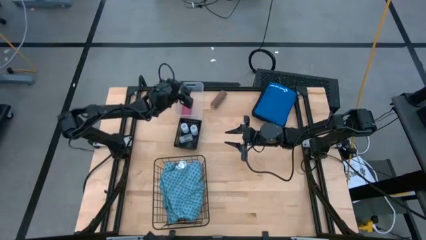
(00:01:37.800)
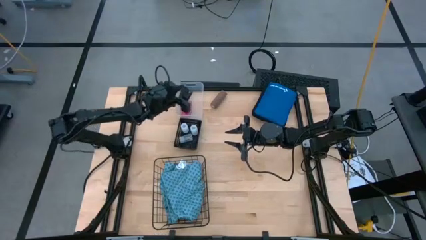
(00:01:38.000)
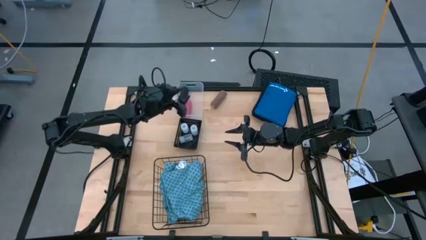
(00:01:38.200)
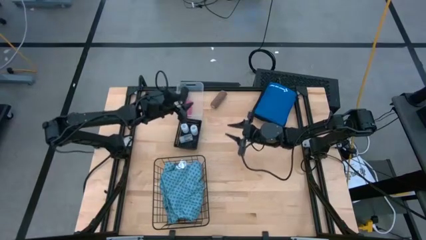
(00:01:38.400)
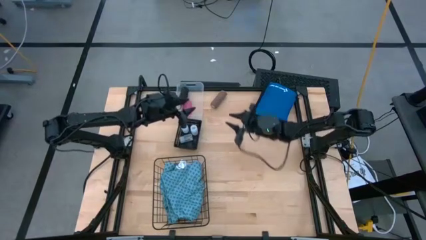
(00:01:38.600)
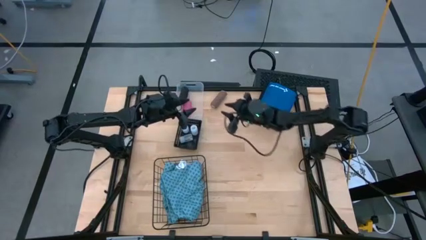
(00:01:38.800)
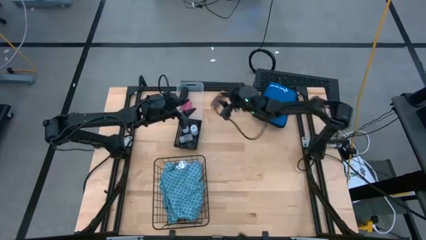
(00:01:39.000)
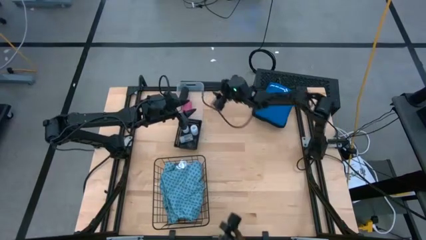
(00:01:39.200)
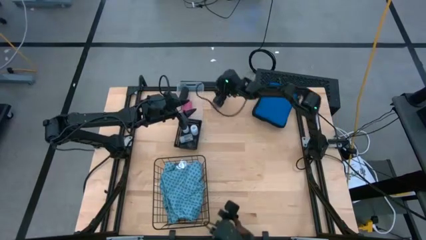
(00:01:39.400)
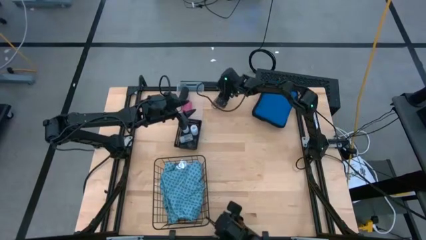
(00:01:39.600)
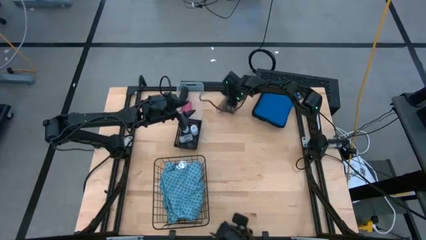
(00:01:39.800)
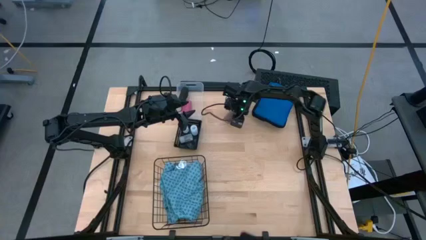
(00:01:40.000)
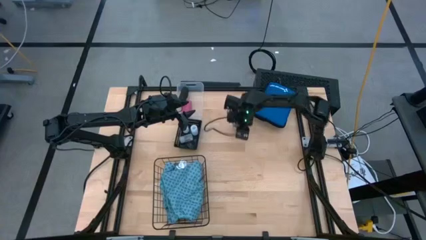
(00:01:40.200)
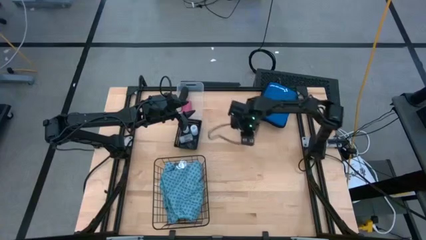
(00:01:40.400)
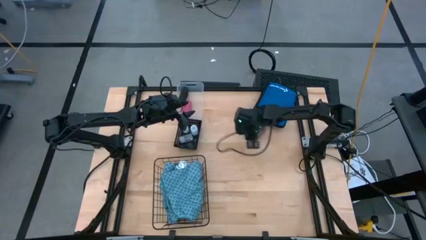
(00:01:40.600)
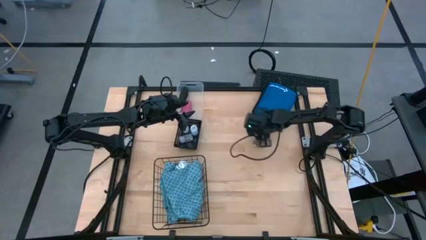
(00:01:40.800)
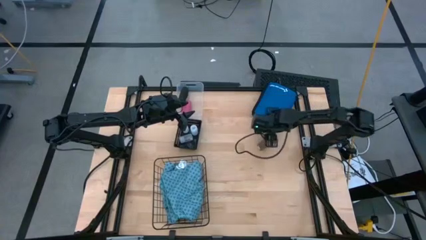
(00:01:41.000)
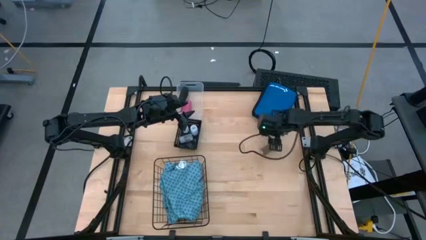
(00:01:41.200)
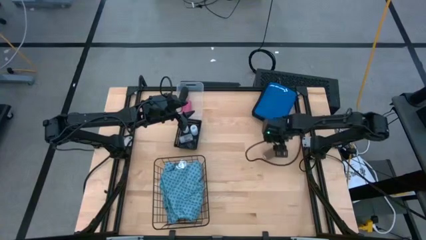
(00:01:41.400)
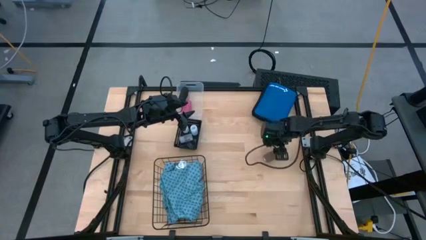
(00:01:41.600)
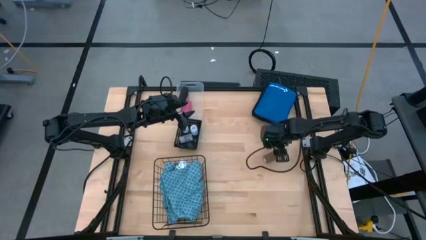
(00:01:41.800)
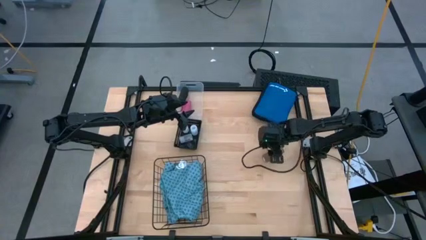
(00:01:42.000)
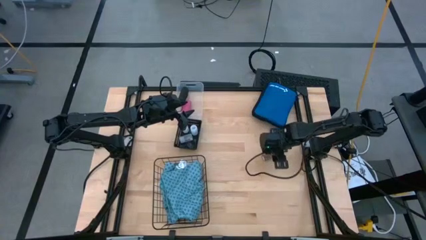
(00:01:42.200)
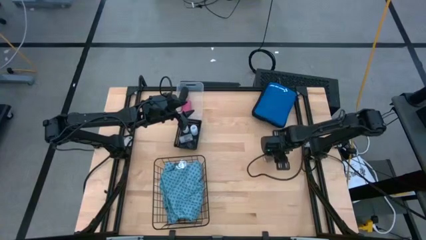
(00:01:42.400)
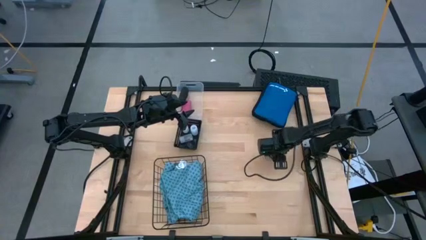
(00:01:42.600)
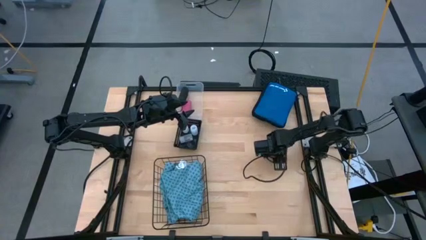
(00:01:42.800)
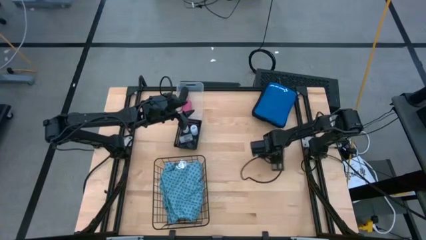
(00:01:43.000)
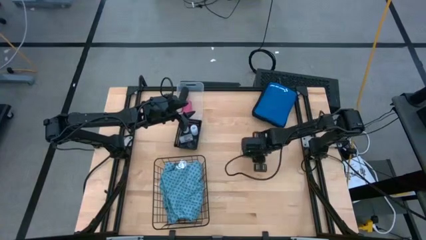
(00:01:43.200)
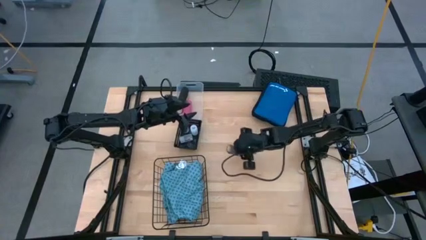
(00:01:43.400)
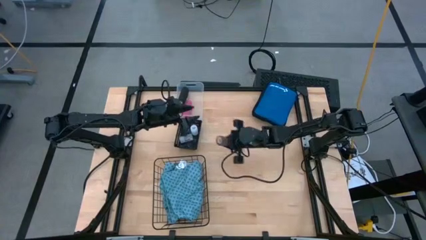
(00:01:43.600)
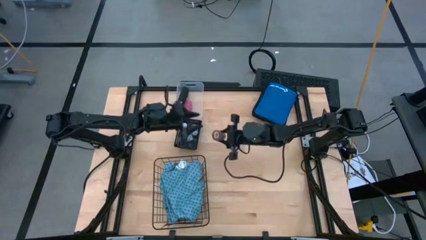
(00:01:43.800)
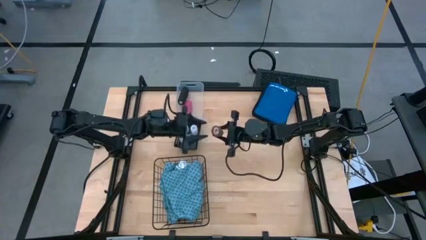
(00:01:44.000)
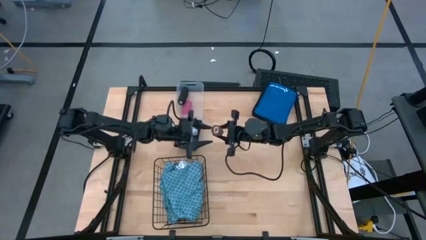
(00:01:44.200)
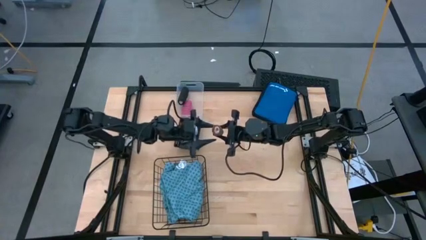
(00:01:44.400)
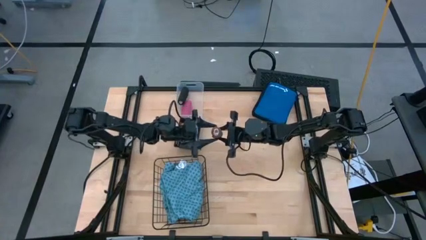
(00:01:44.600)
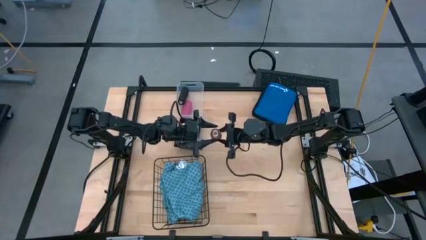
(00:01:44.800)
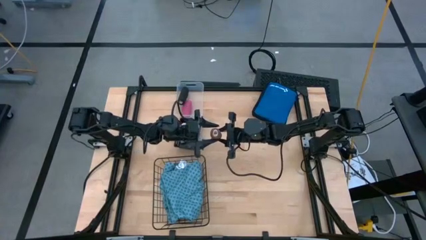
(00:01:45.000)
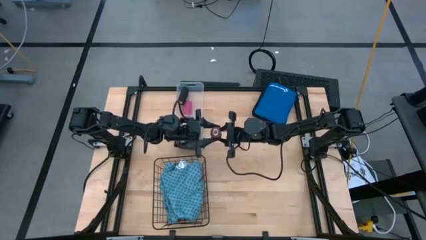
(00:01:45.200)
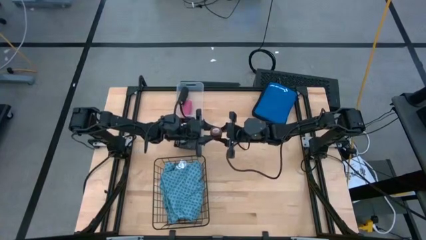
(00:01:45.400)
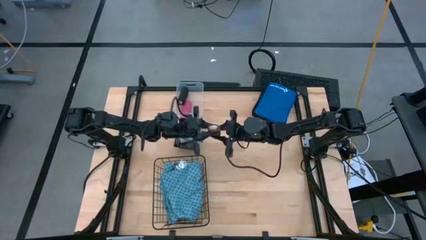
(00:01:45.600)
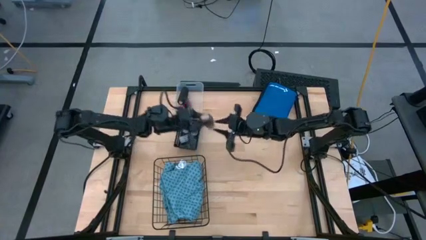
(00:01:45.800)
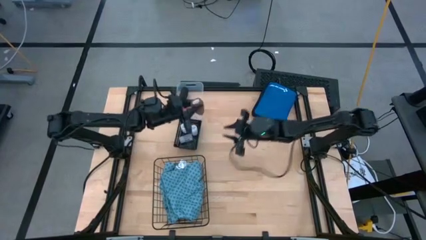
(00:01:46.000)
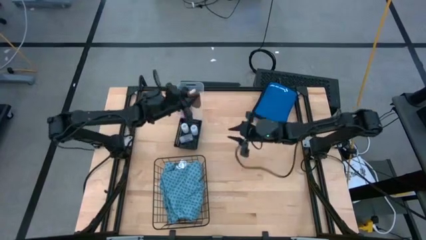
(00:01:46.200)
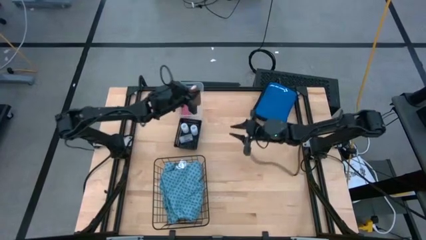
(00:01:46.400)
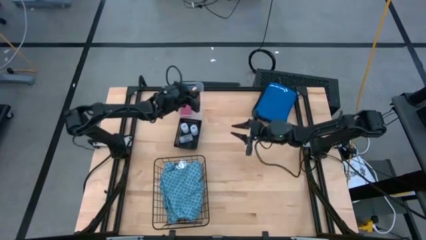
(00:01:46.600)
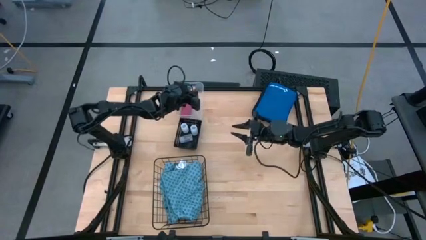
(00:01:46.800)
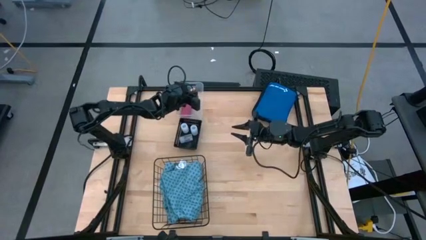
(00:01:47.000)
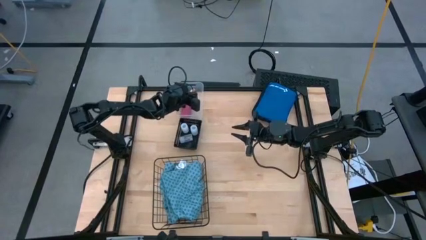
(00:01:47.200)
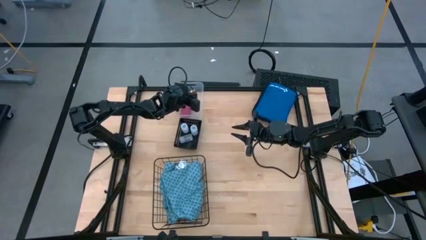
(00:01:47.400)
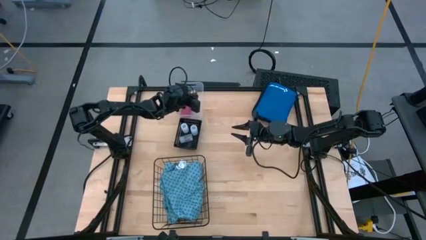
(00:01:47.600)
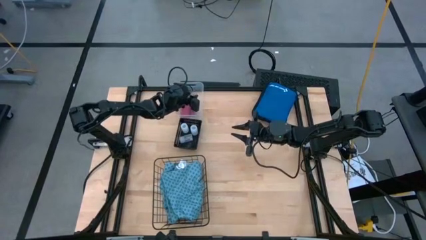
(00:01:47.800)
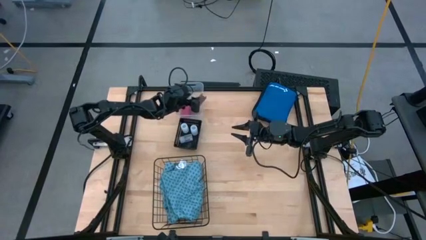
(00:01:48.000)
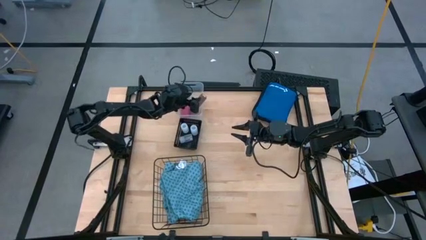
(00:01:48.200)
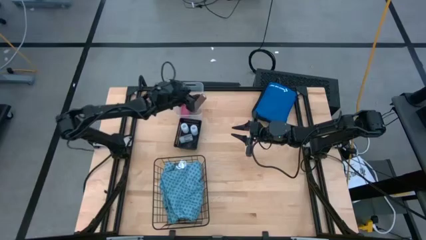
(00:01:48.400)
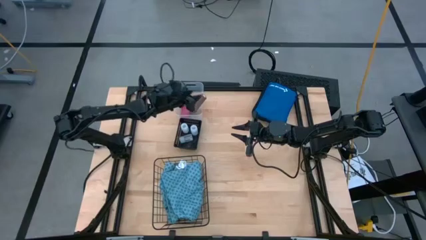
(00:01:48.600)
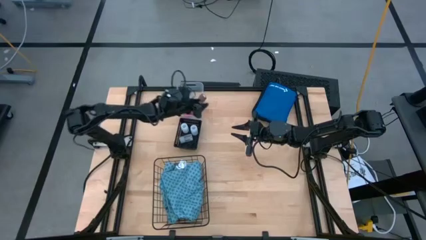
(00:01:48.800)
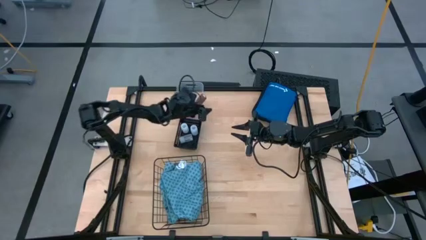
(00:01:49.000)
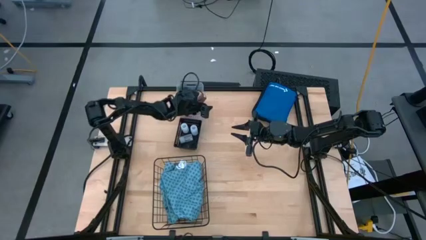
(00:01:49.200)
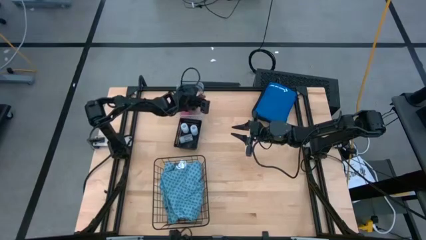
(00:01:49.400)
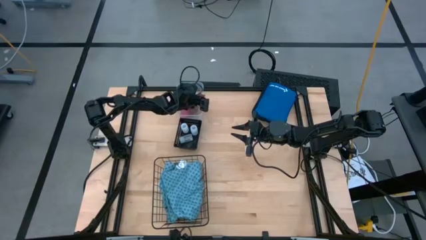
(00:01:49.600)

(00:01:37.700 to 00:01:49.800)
Task: Pick & place medical supplies in basket/bin
Put the brown bandage into the transparent bin
